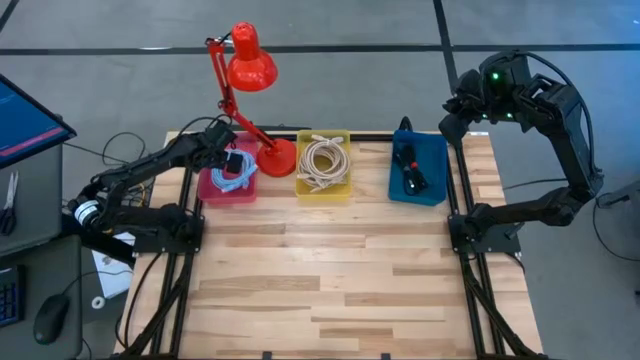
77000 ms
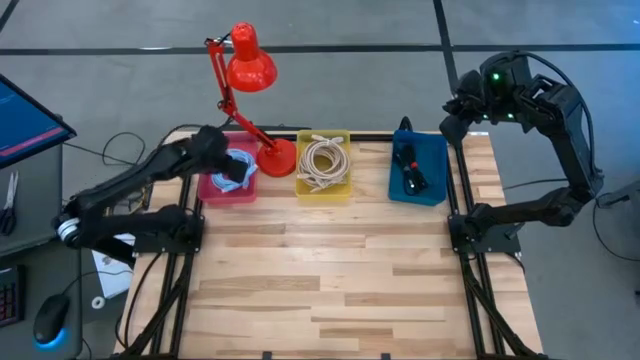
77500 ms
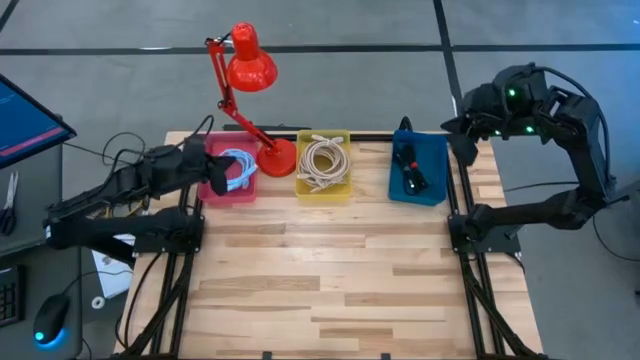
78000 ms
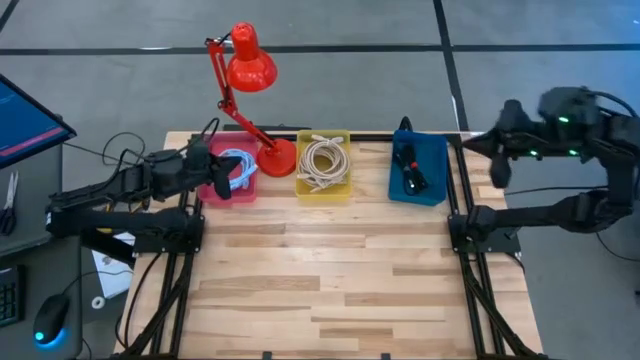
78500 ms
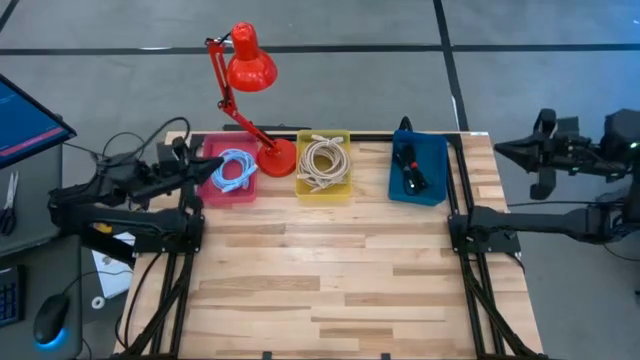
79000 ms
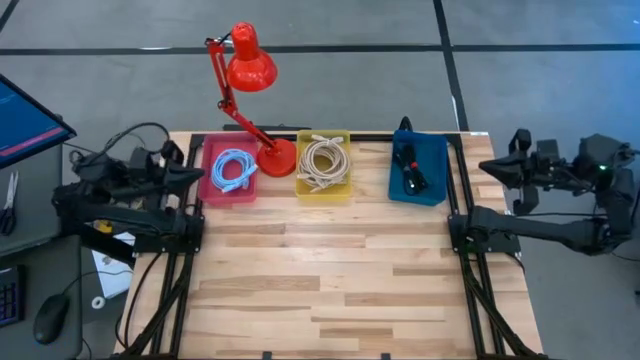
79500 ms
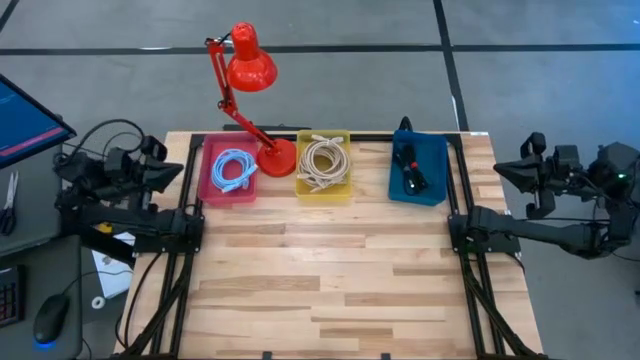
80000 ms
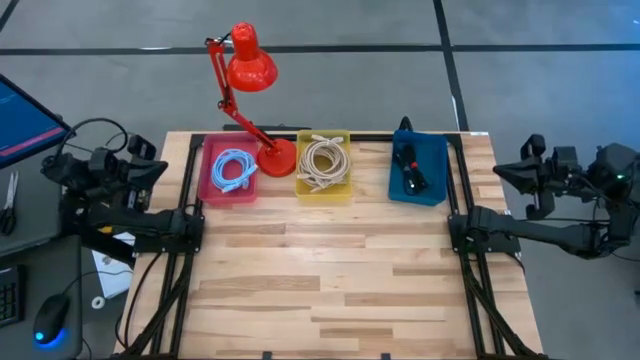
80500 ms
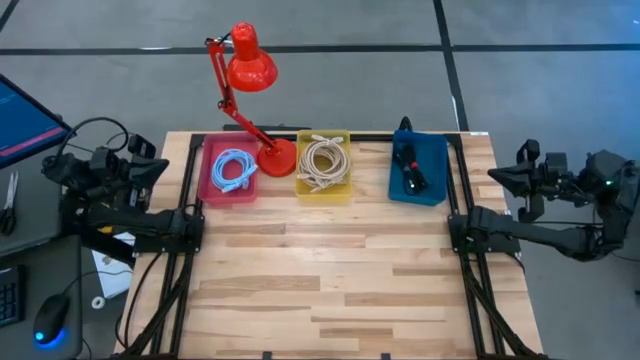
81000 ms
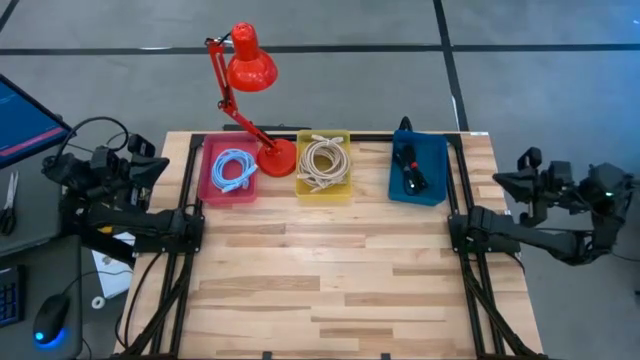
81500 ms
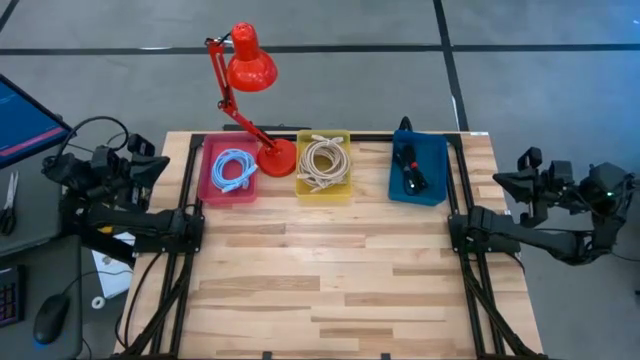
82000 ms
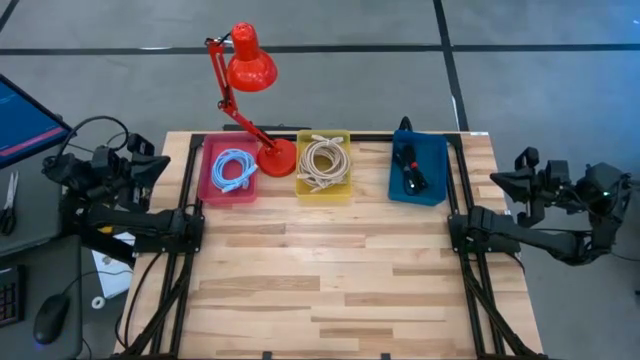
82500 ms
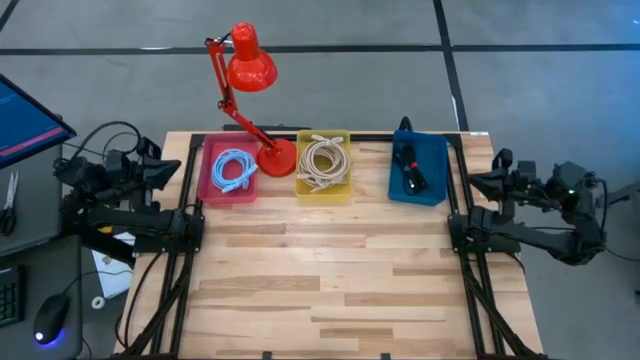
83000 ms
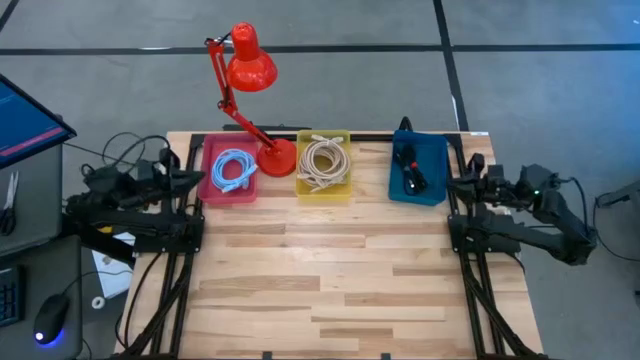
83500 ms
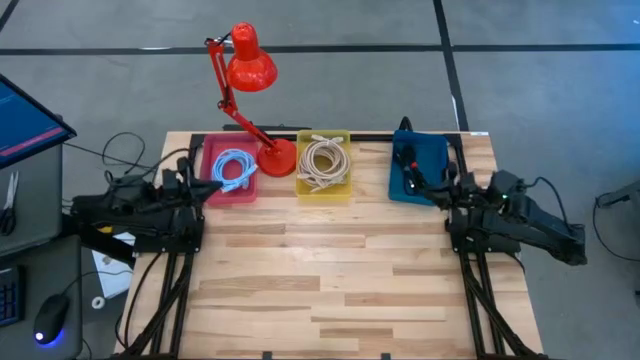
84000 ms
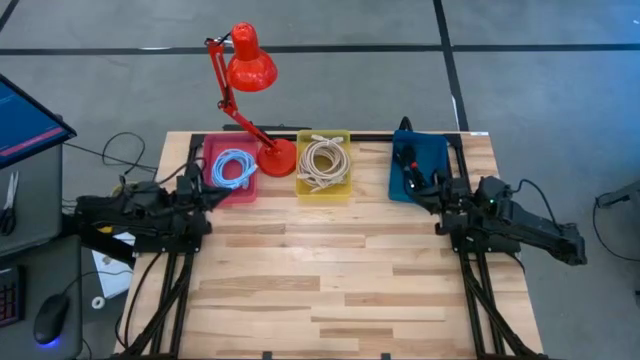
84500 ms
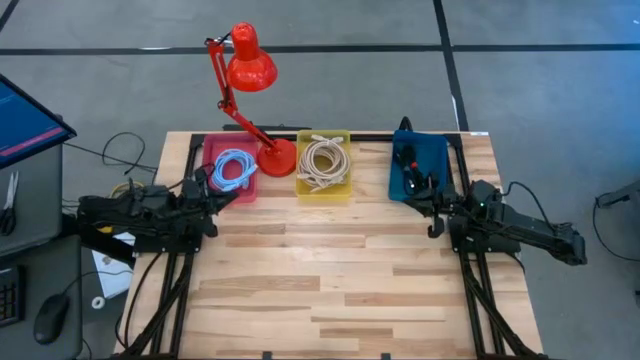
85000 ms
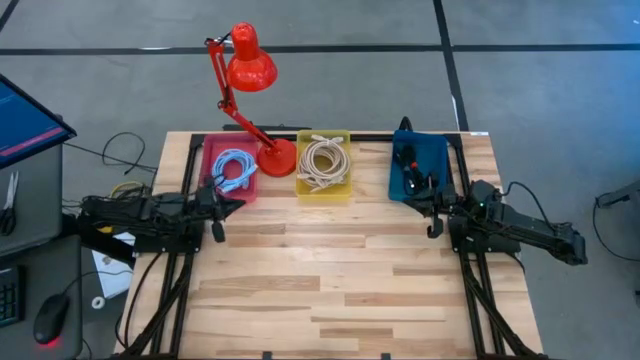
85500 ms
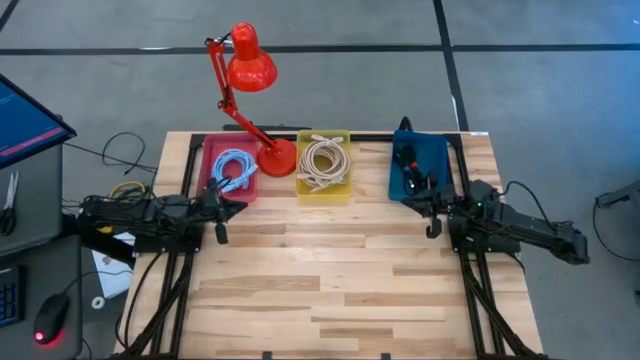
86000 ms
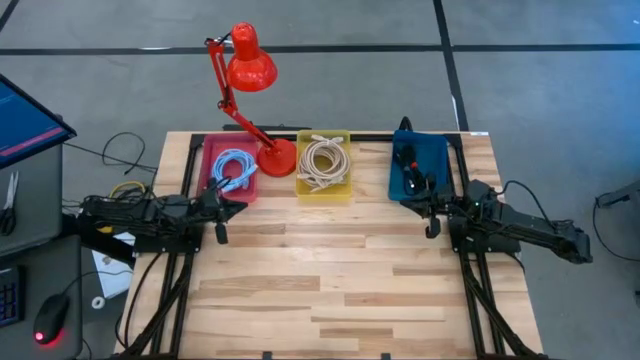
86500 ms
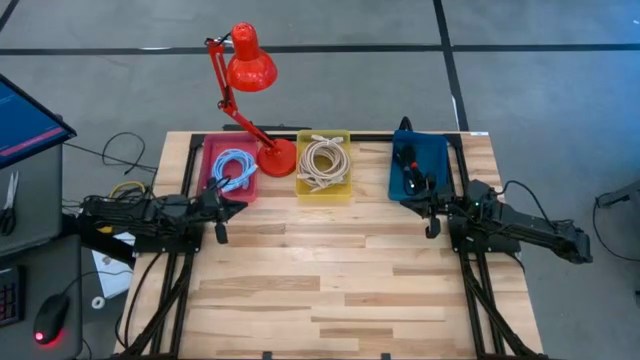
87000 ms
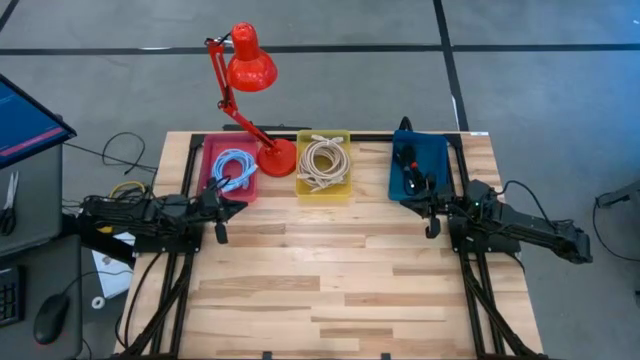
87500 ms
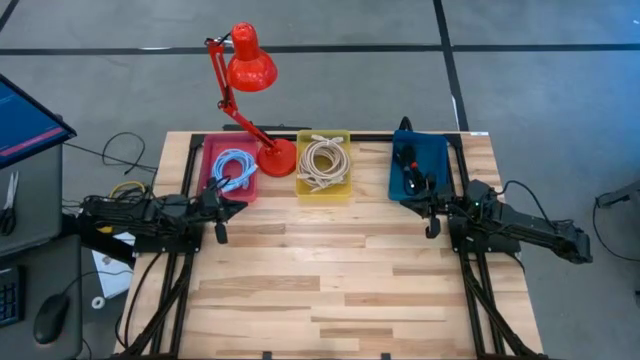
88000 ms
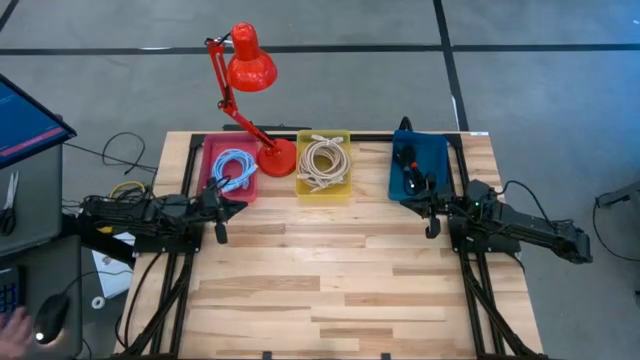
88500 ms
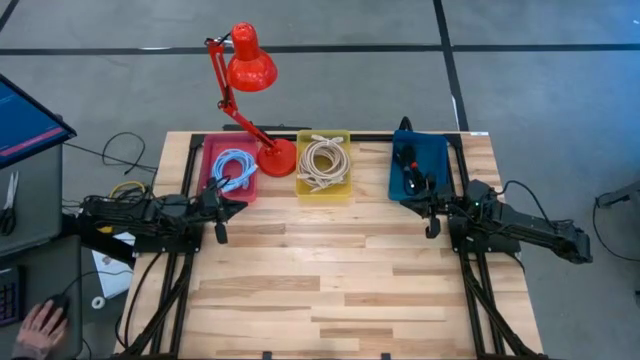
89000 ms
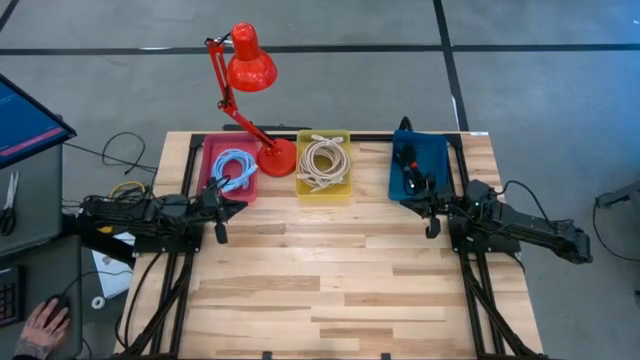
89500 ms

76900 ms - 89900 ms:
Task: Sort HDMI cables
Return to Home Position

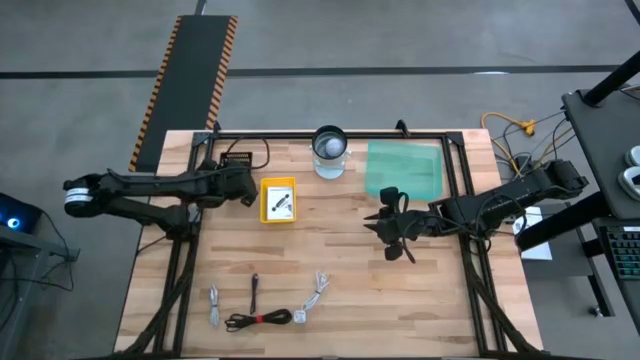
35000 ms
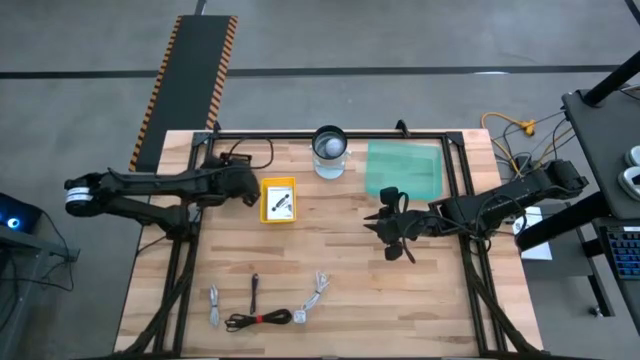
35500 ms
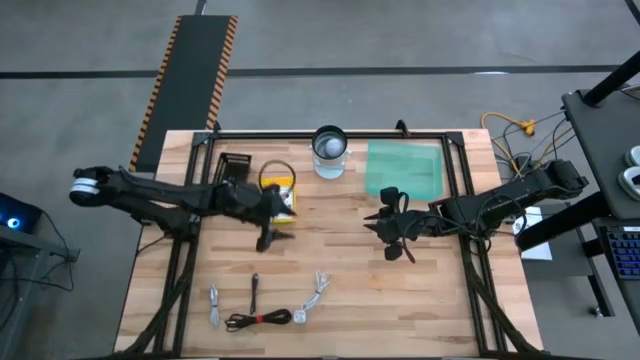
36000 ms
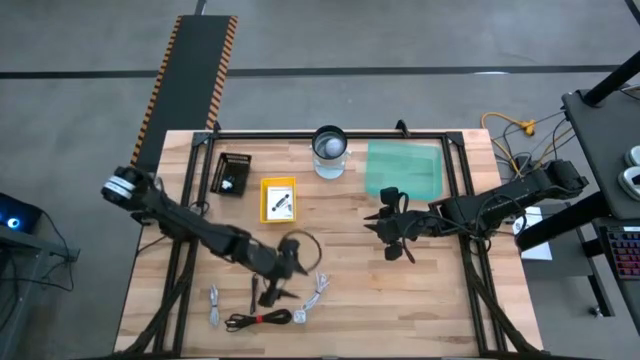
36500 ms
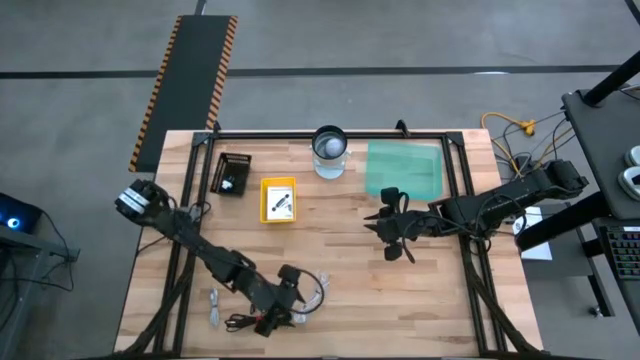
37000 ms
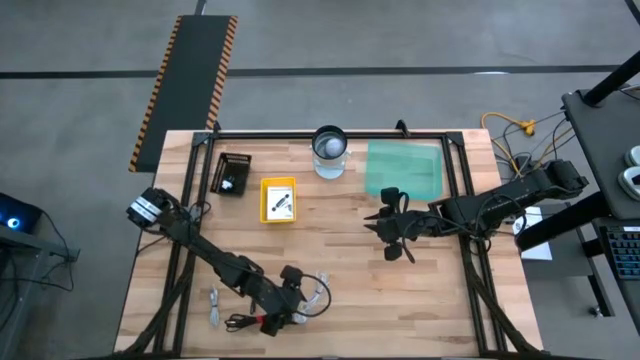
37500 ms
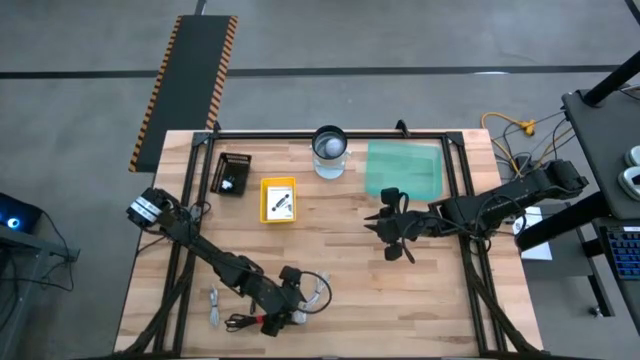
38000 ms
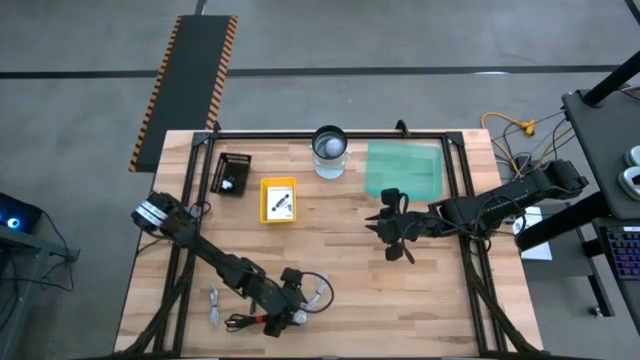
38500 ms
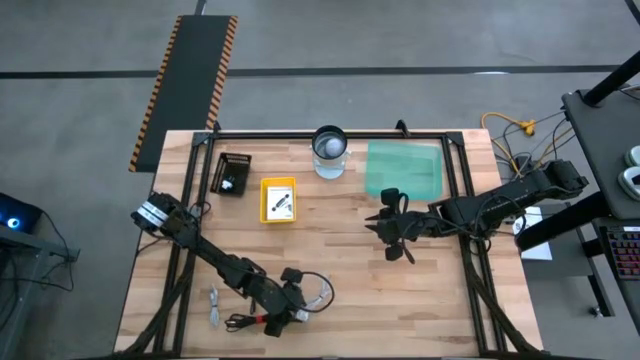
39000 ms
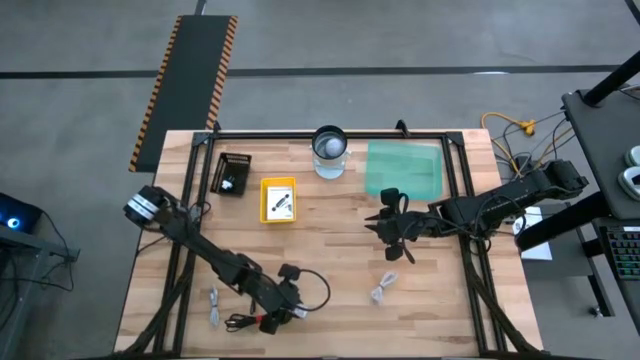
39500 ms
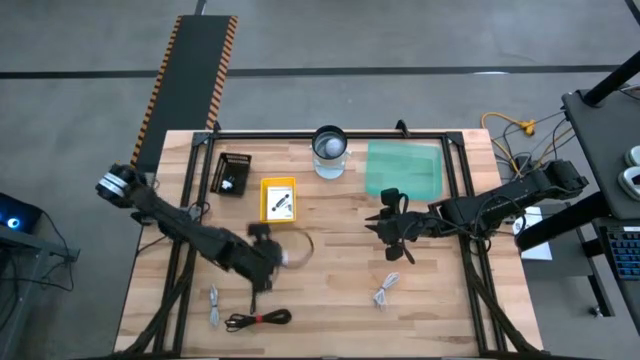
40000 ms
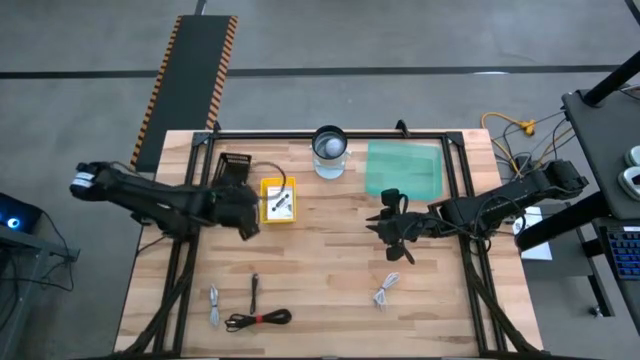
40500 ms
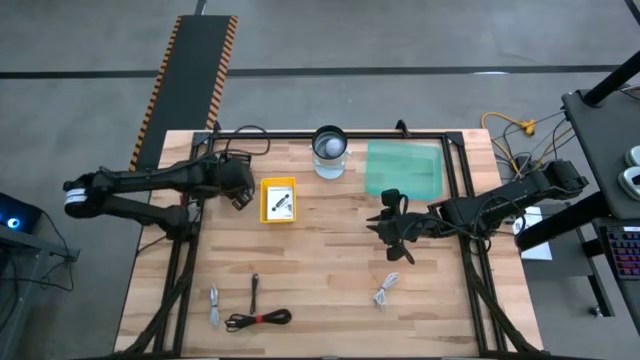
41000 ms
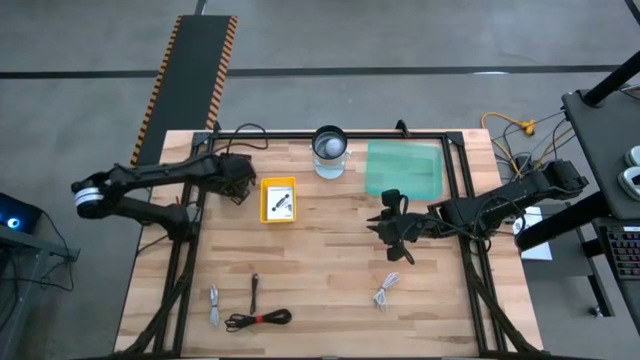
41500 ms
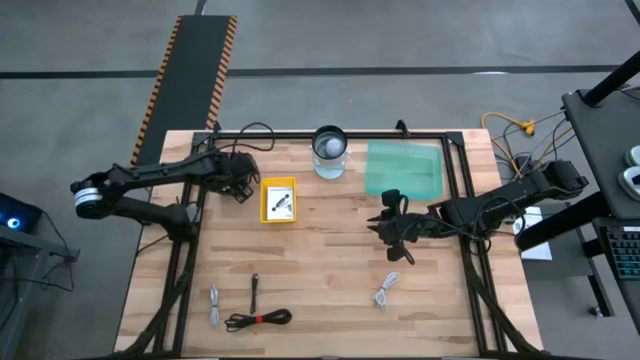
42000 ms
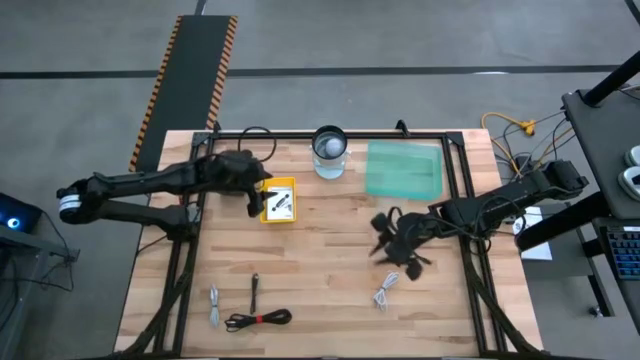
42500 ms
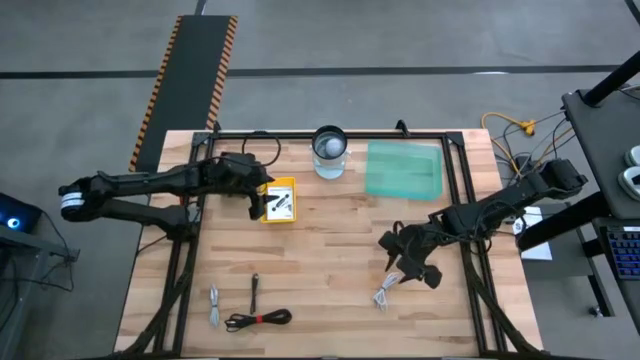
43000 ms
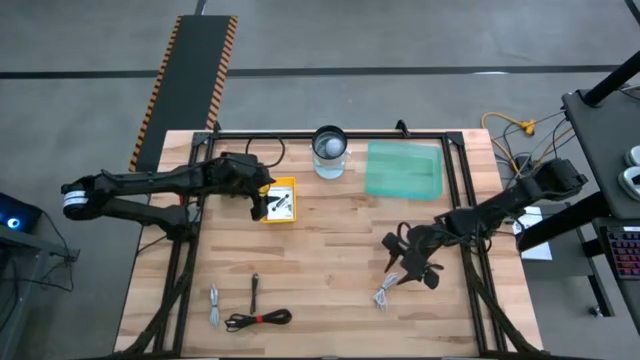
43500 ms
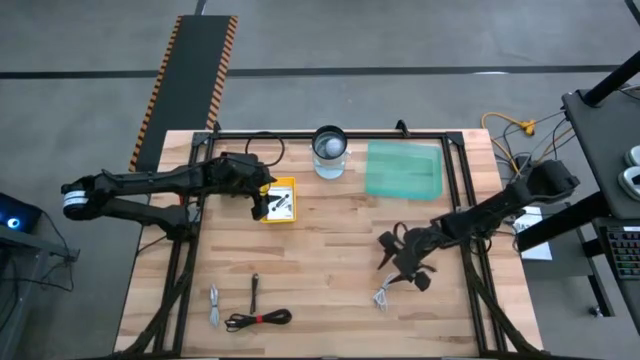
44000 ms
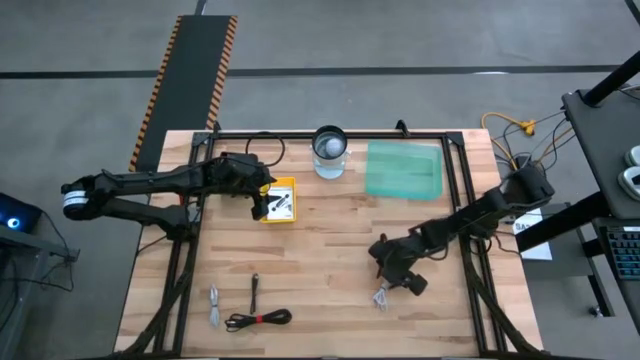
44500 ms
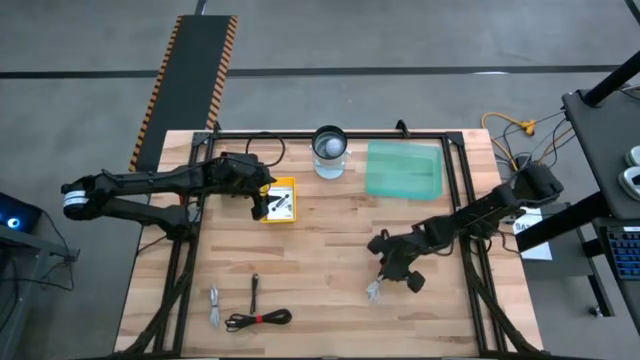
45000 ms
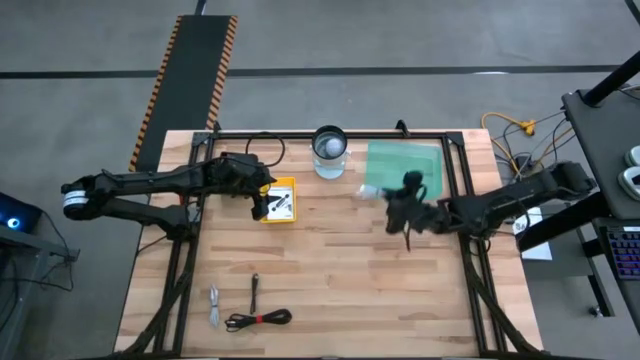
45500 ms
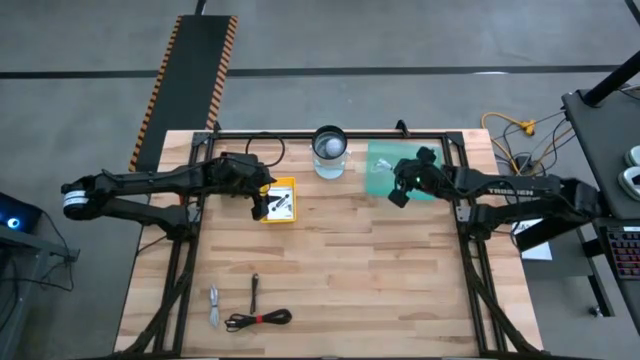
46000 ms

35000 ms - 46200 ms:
Task: Pick and place items into bin
Put the right white charger adapter into the black bin
